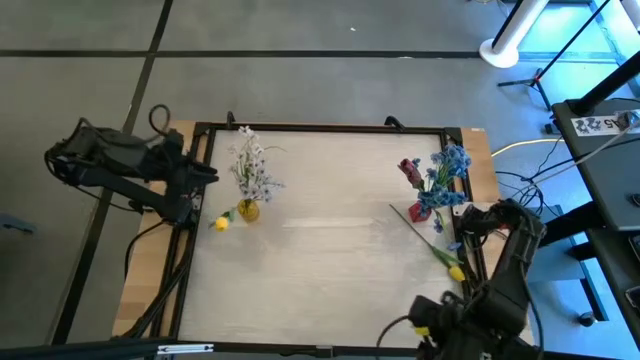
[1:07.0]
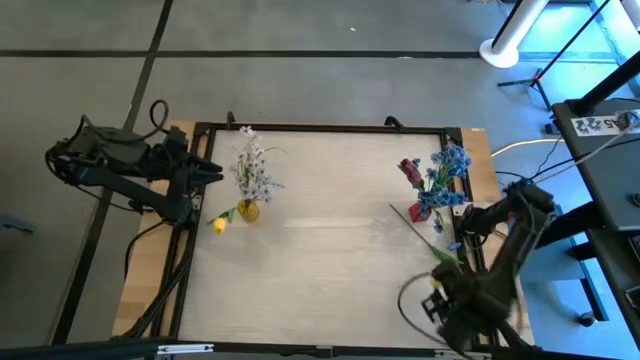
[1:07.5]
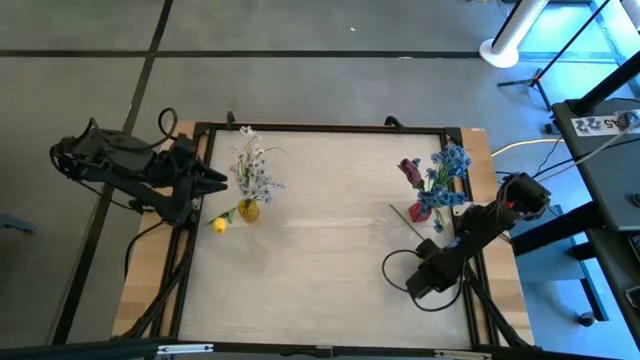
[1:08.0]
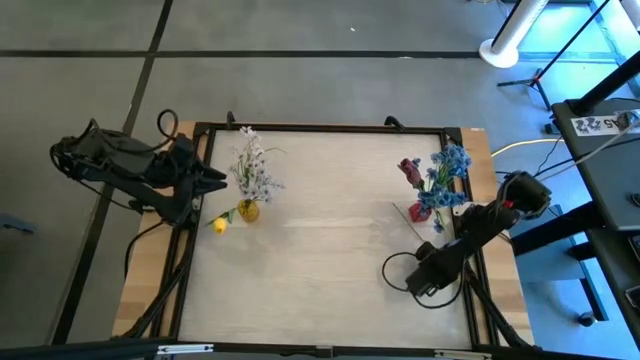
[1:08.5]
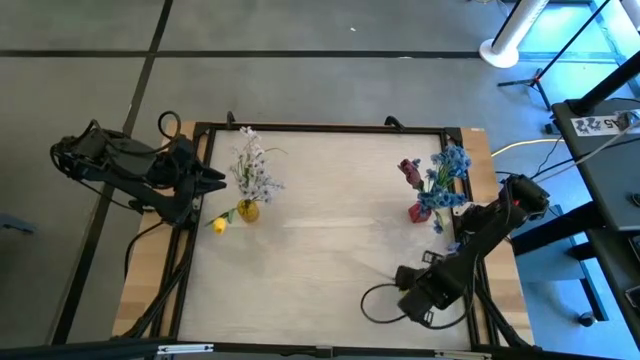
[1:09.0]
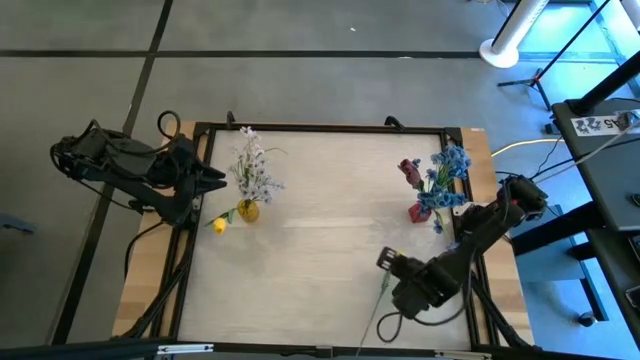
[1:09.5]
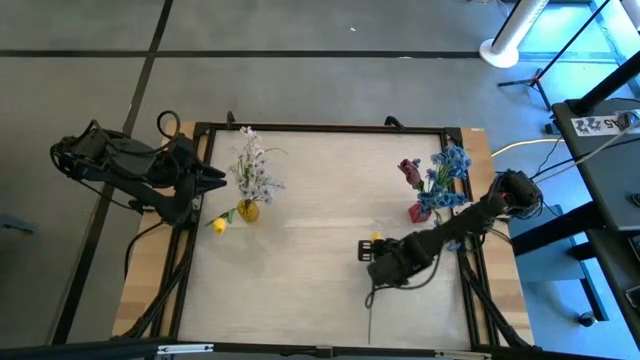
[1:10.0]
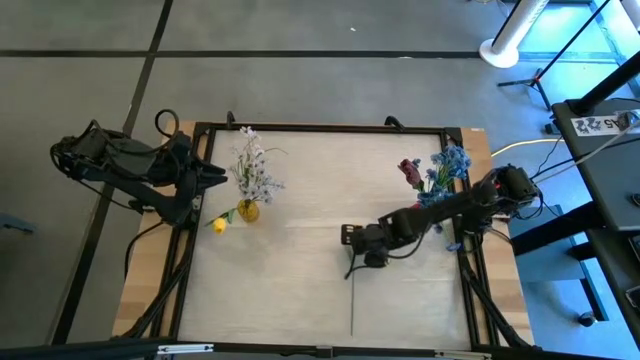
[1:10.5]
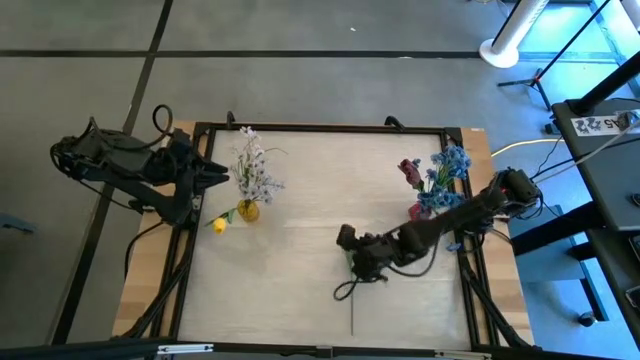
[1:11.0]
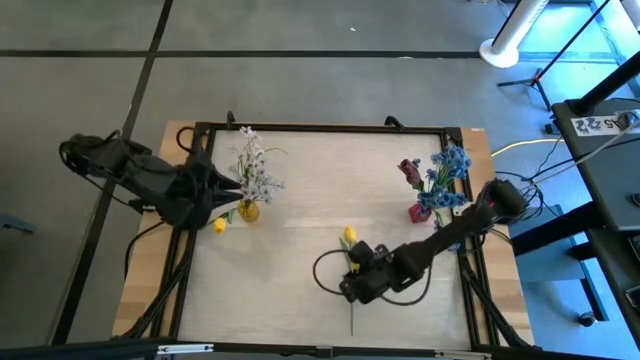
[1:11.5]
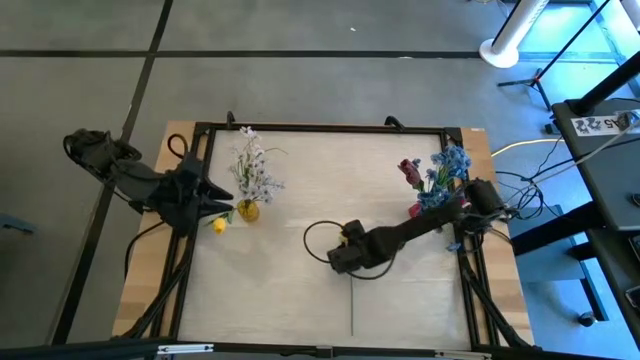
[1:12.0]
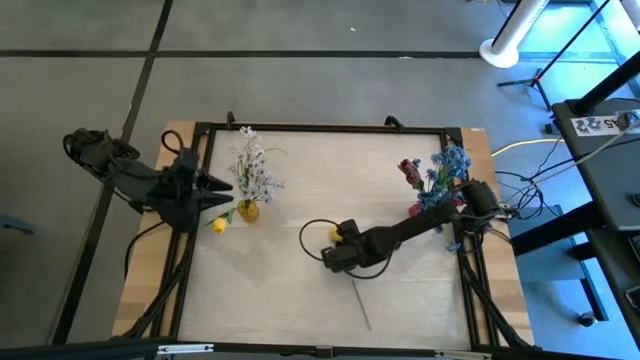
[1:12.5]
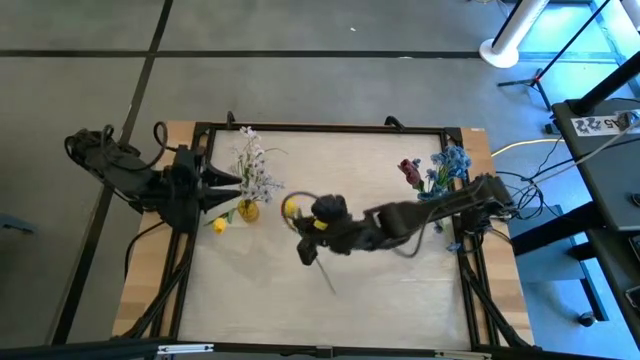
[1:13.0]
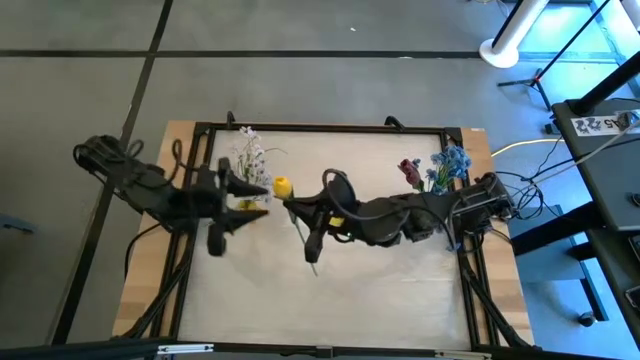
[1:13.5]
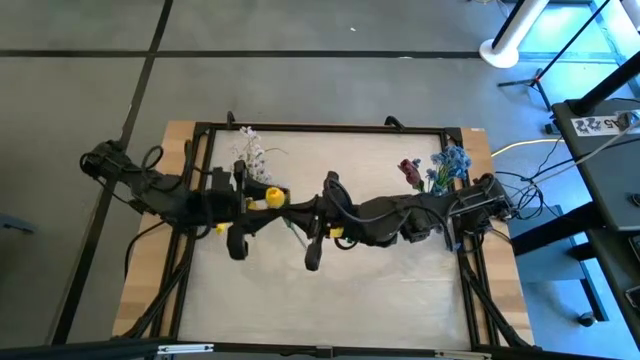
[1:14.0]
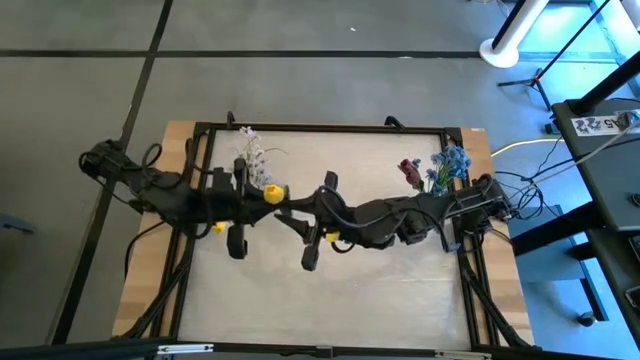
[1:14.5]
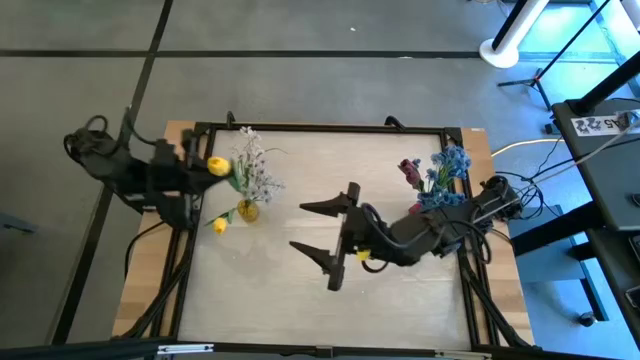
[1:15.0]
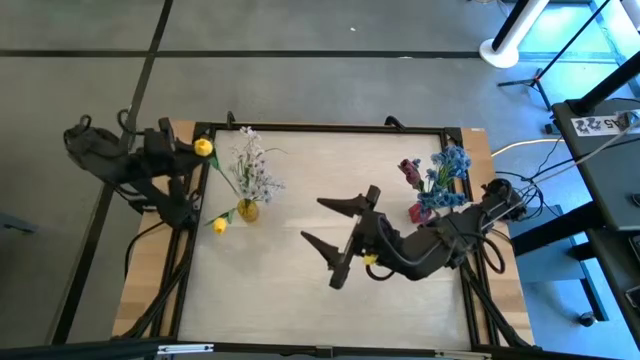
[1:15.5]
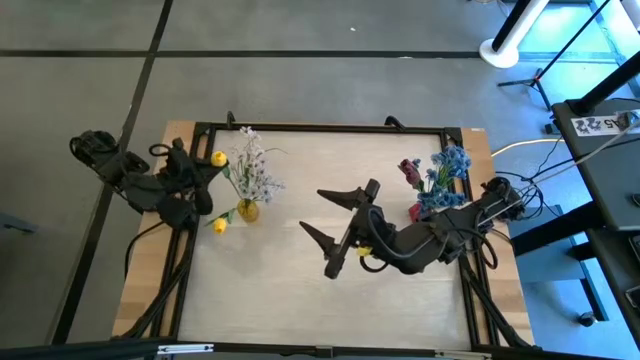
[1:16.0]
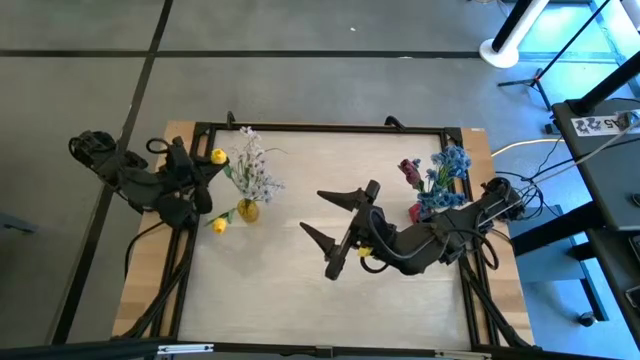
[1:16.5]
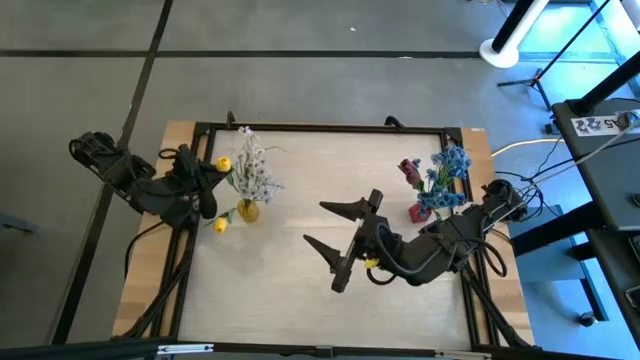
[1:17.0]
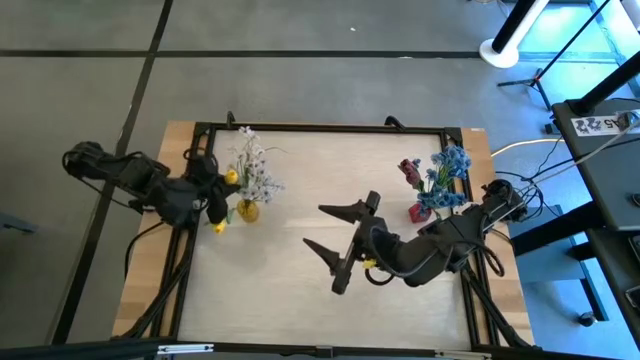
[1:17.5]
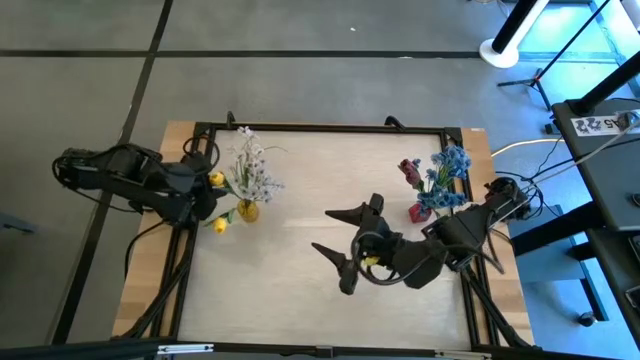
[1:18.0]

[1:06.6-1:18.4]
Task: Sort flowers into vase by color
Put the yellow flower into the yellow vase

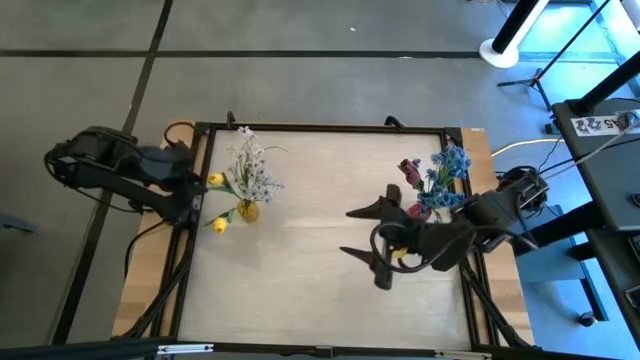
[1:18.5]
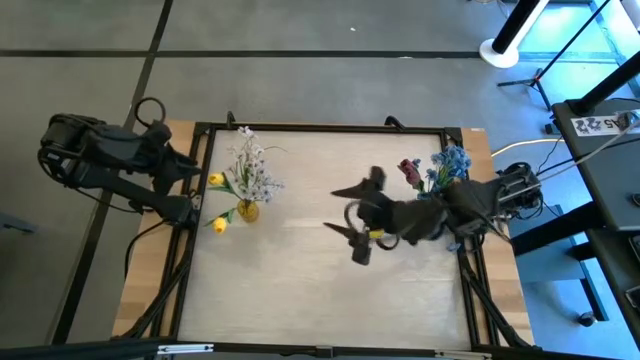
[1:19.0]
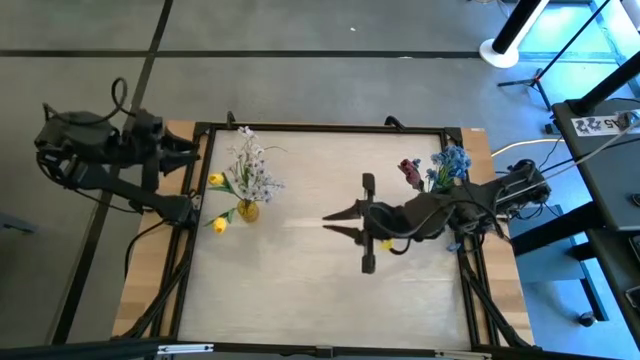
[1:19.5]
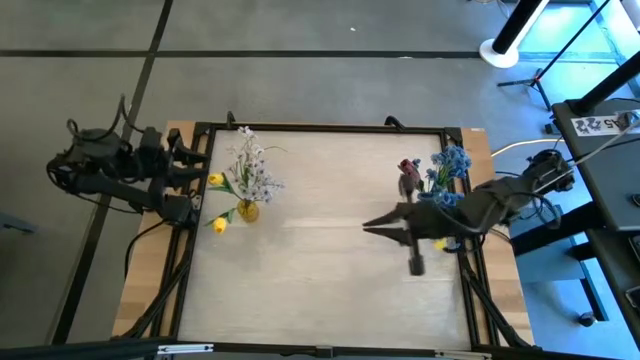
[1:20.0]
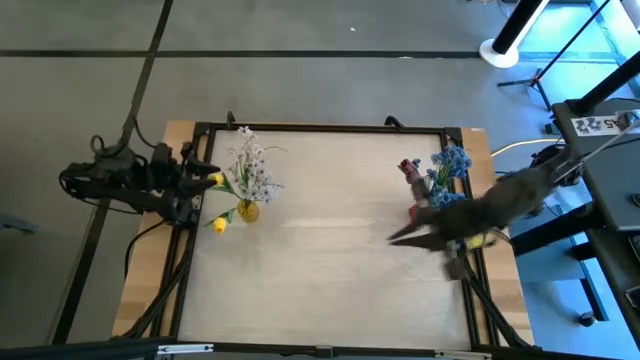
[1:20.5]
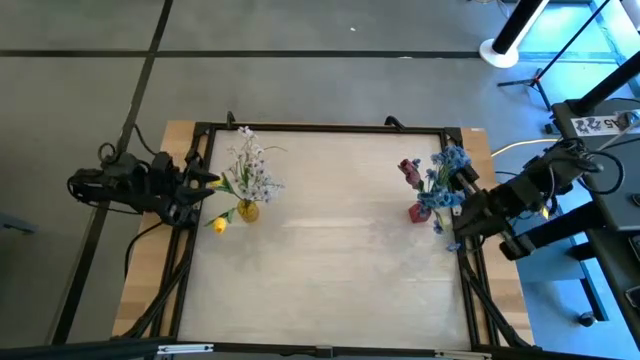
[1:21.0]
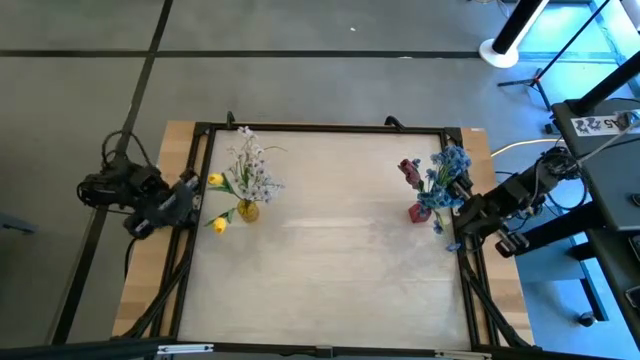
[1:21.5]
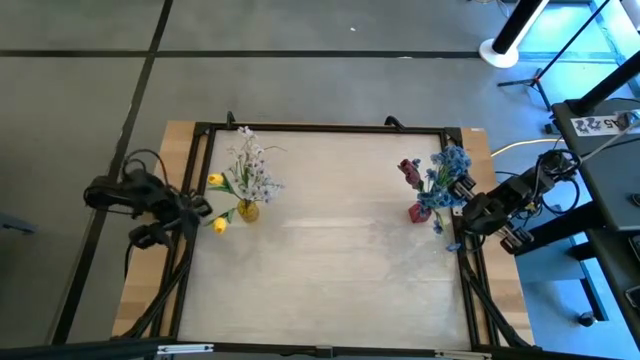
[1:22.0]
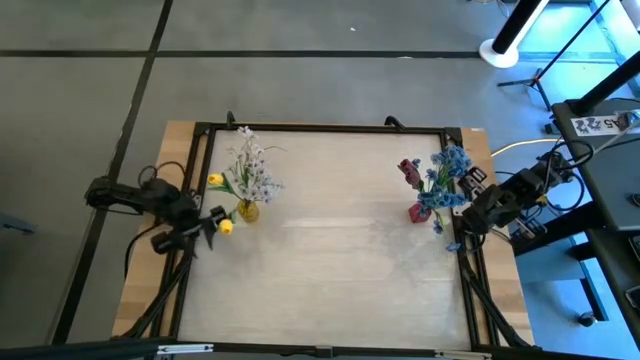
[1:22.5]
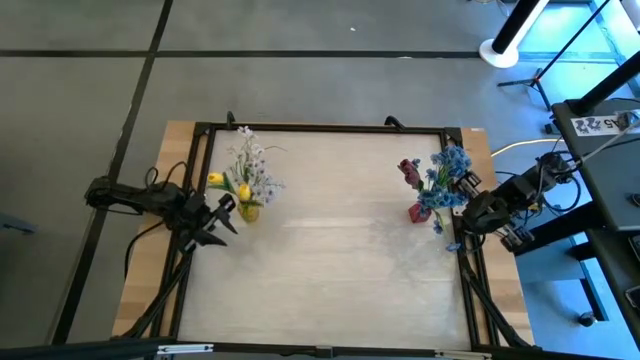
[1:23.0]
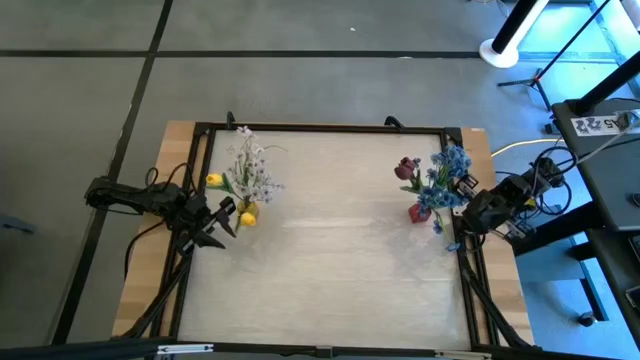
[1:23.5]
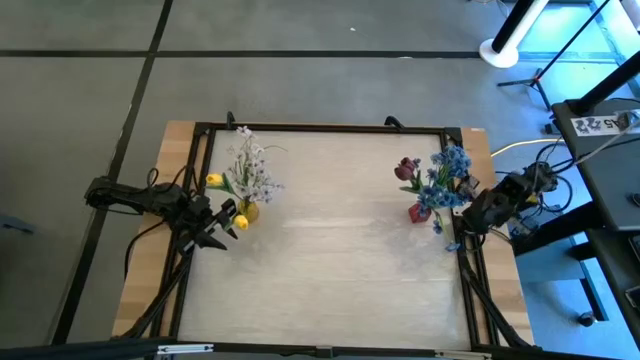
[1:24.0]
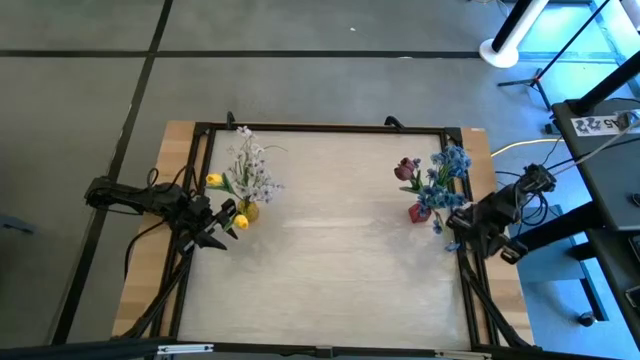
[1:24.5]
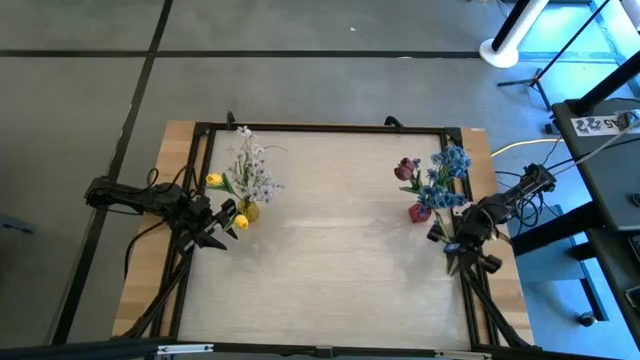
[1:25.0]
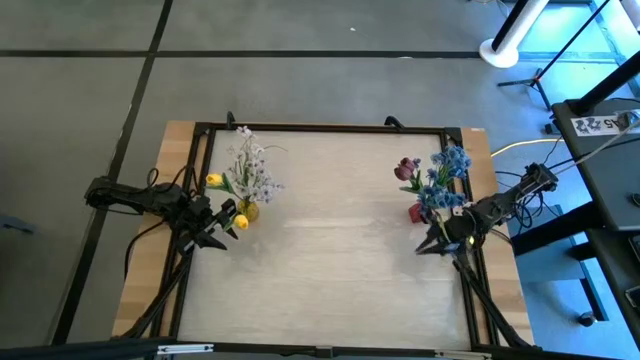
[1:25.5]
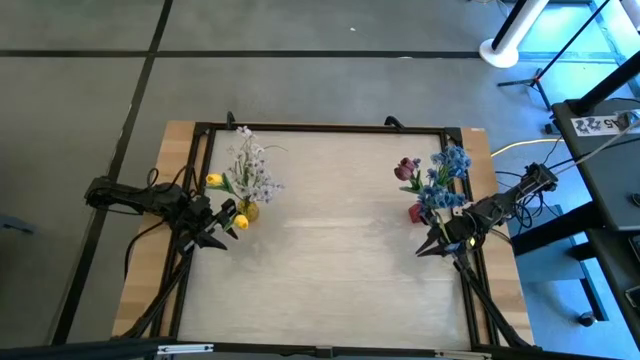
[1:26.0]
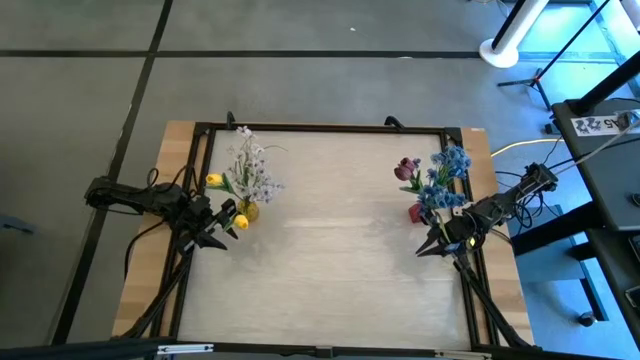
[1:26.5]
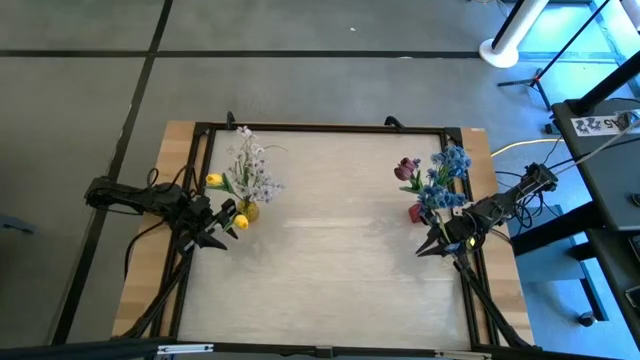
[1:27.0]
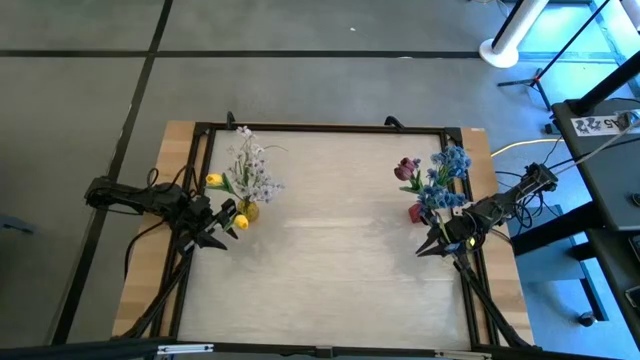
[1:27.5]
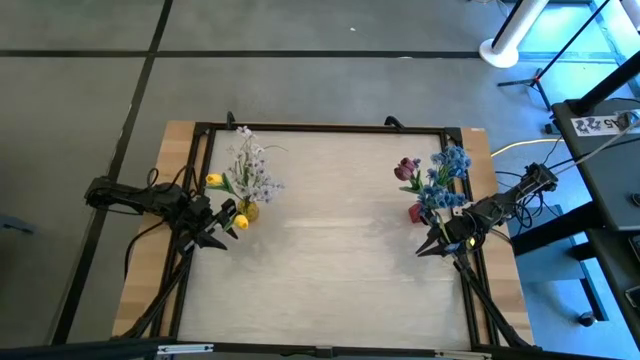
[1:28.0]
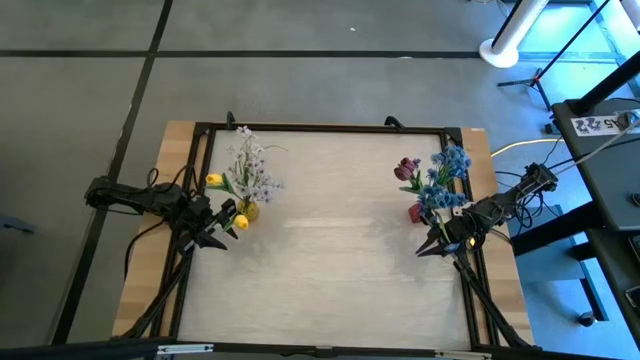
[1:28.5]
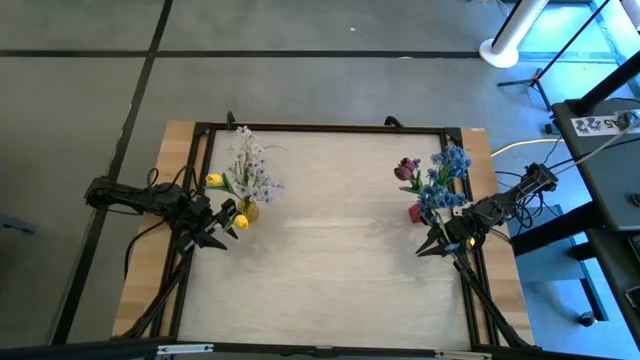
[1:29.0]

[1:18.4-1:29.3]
Return to Home Position
